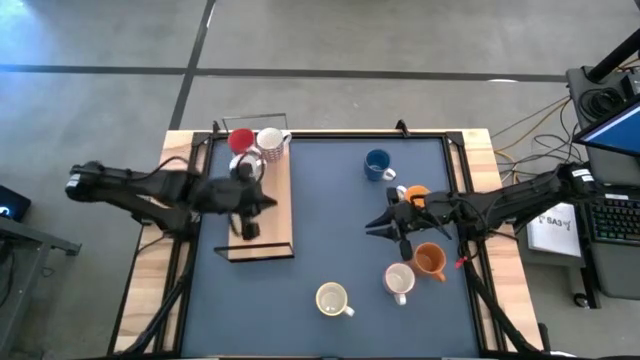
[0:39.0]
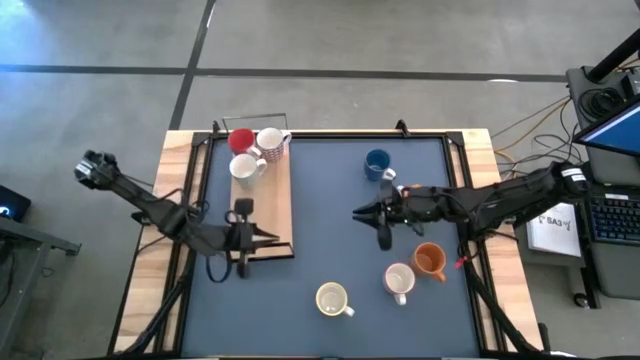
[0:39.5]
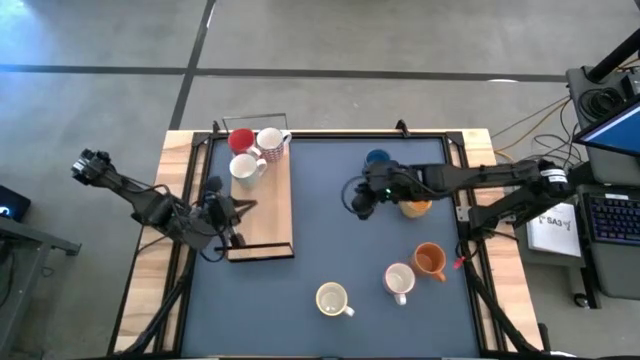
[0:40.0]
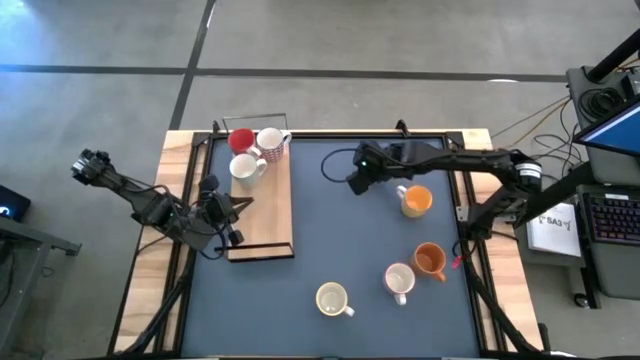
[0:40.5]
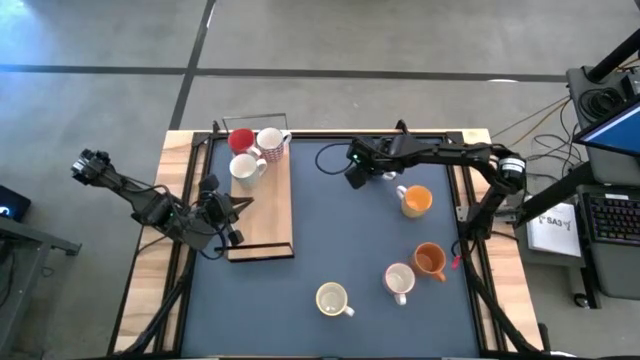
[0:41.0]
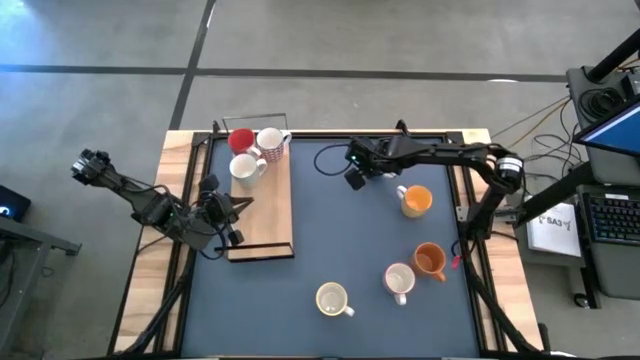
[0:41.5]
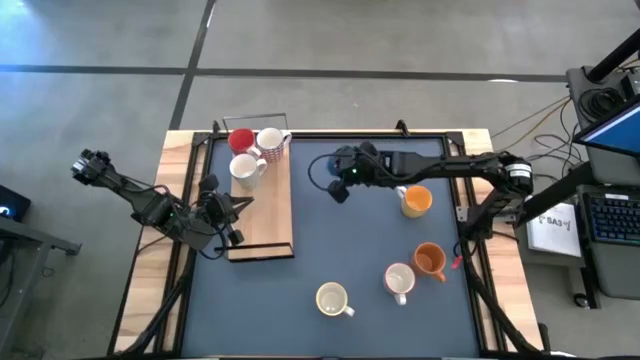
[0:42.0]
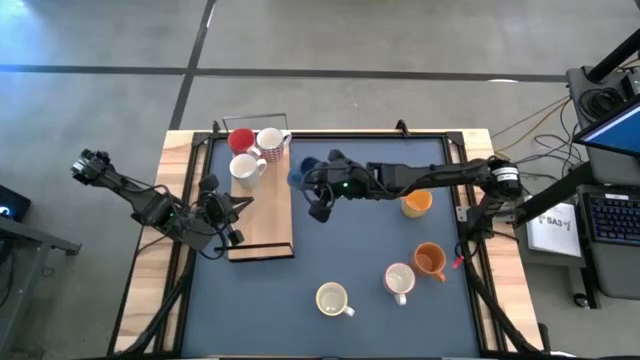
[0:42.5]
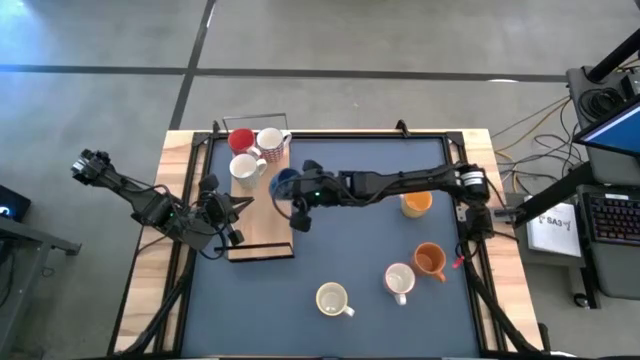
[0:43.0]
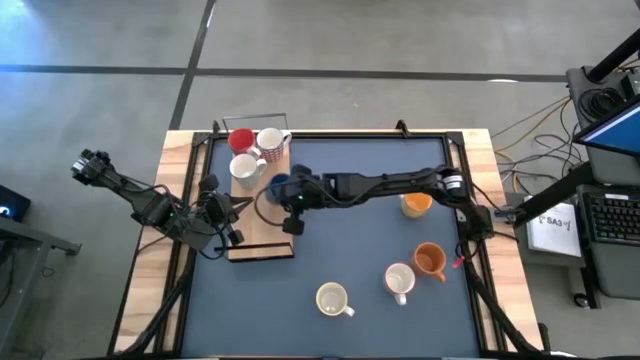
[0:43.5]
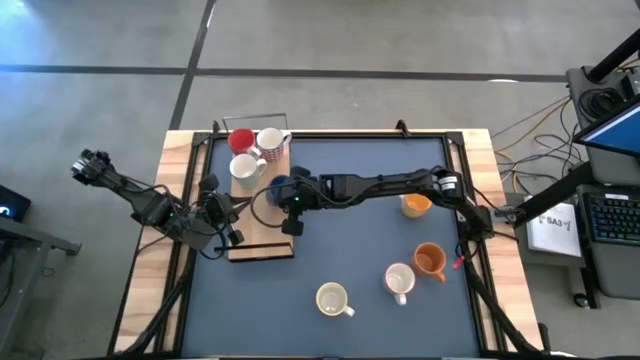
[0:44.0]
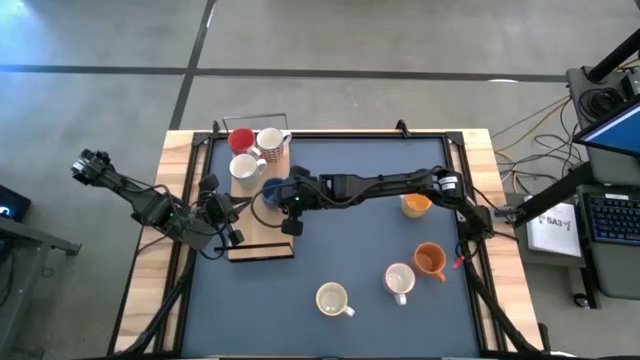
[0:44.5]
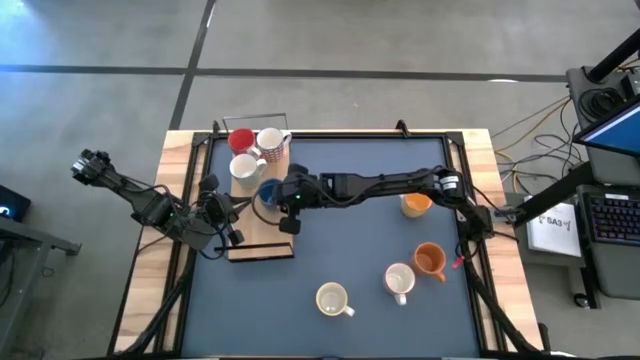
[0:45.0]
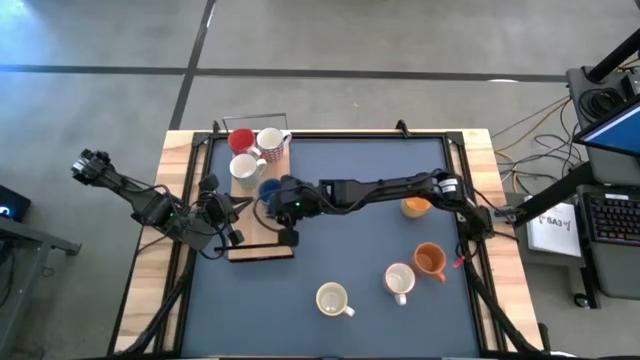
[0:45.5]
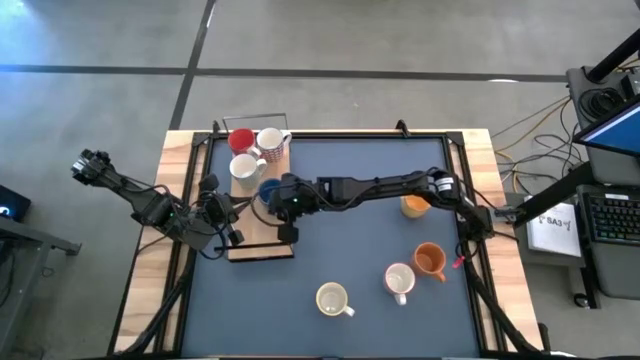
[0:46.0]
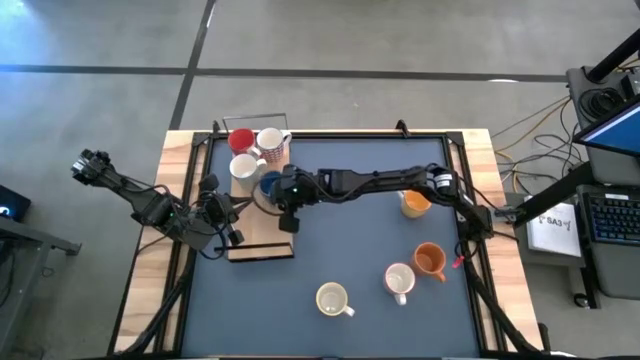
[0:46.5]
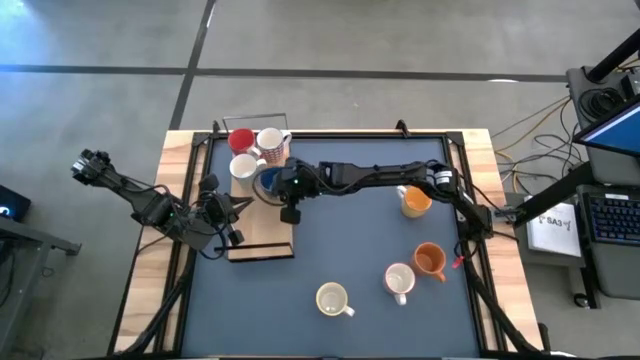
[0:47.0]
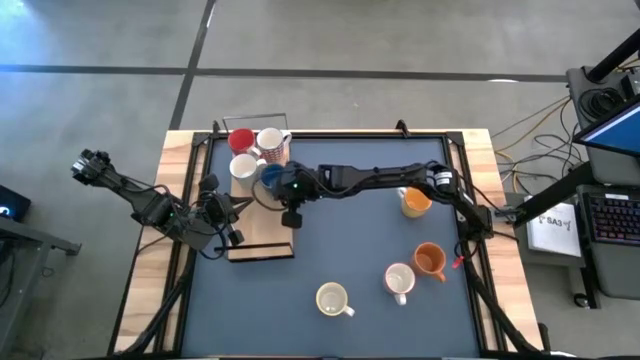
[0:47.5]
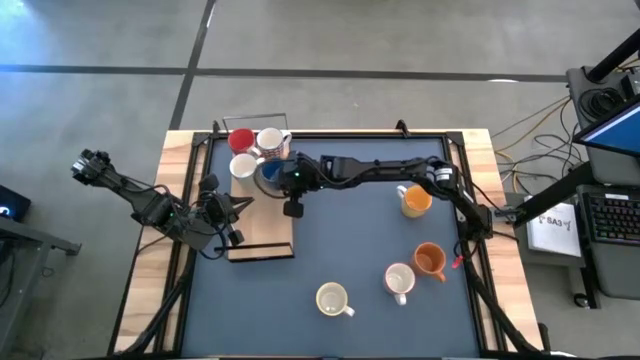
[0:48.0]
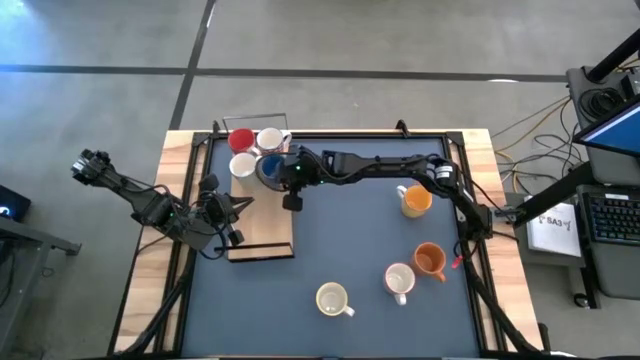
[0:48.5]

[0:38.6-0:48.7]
Task: Place coffee mugs
Put the blue mug on the shelf

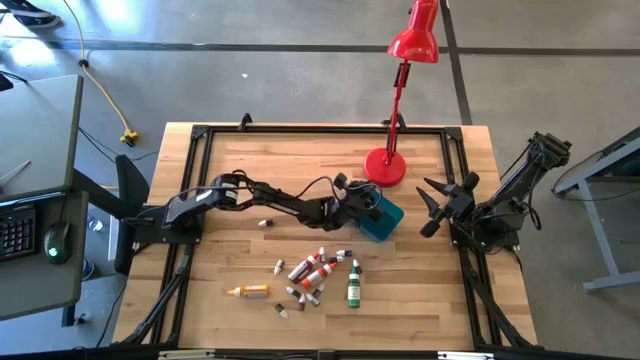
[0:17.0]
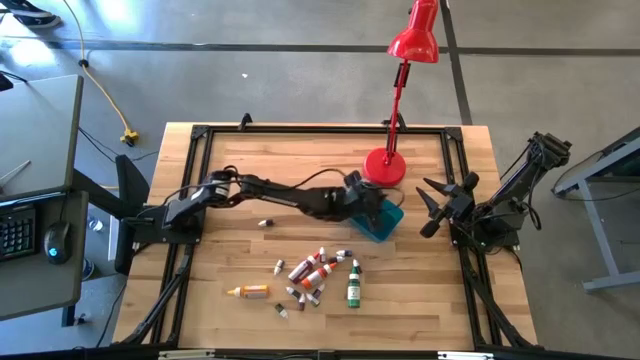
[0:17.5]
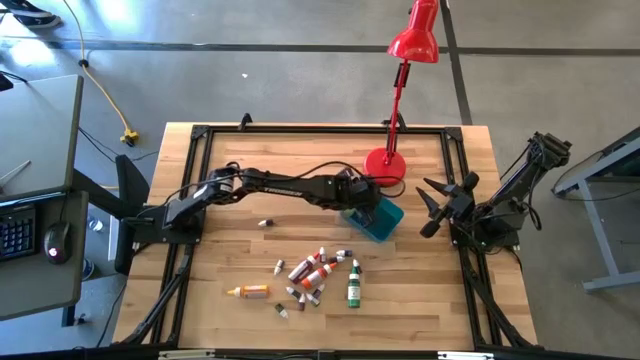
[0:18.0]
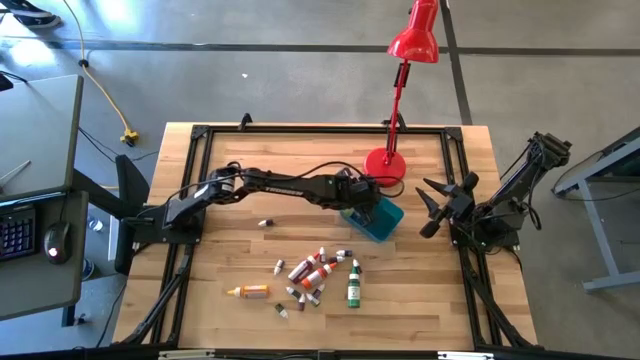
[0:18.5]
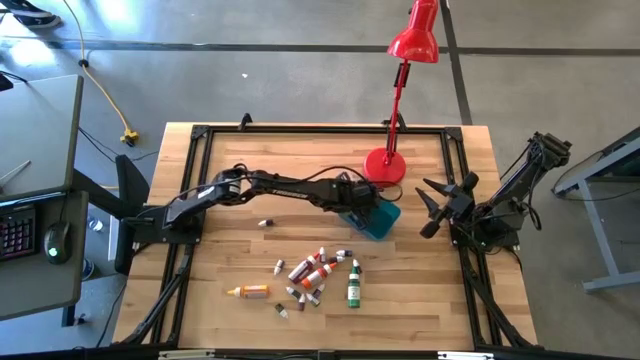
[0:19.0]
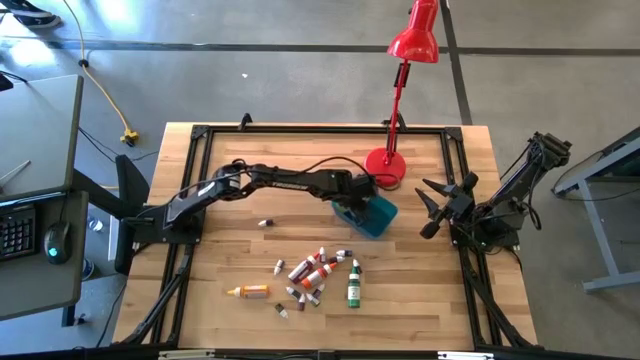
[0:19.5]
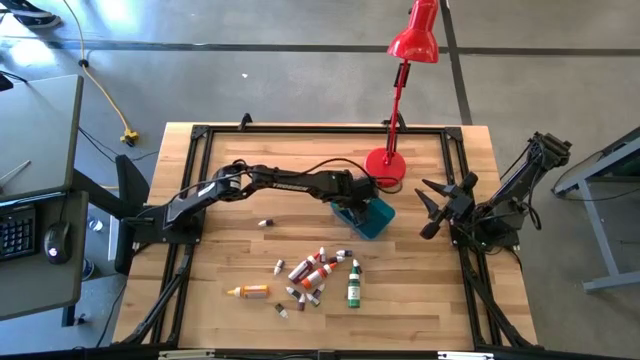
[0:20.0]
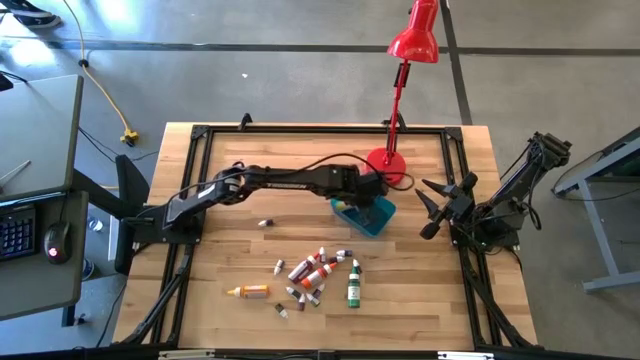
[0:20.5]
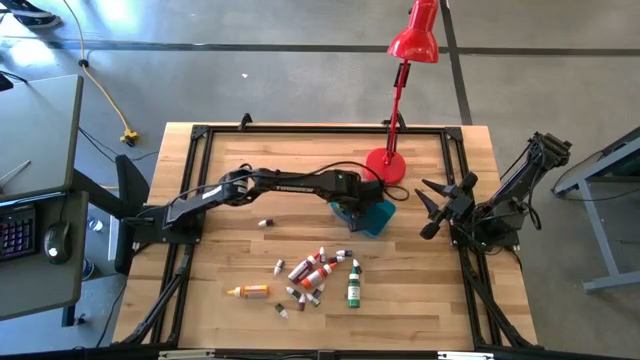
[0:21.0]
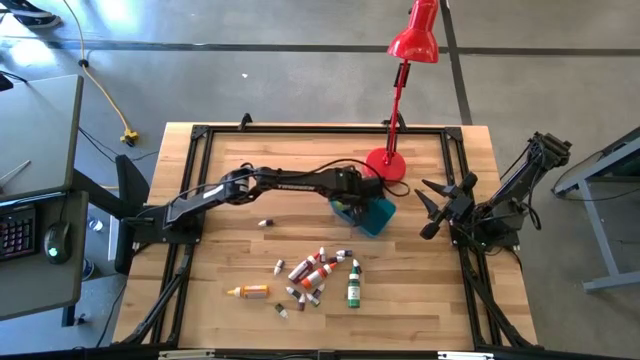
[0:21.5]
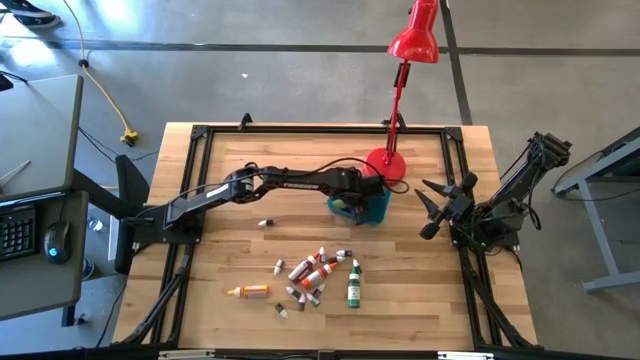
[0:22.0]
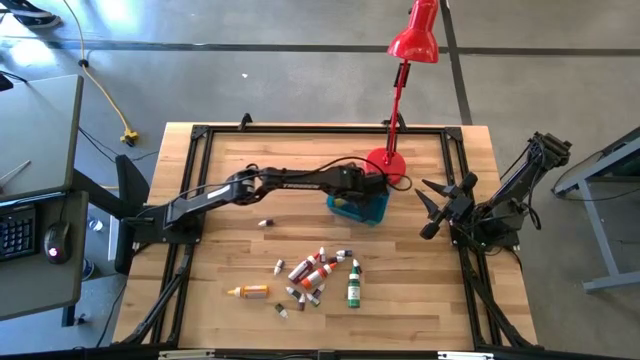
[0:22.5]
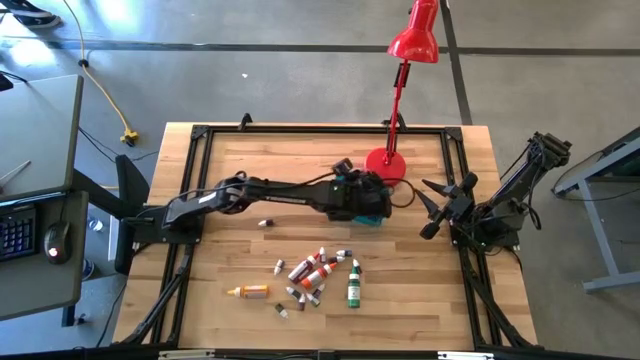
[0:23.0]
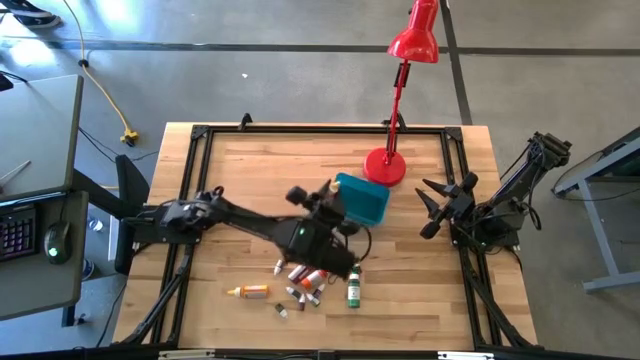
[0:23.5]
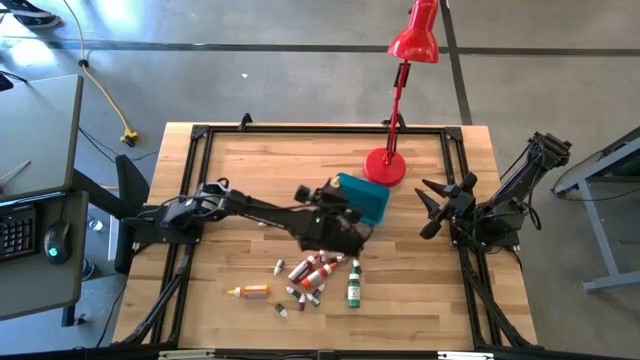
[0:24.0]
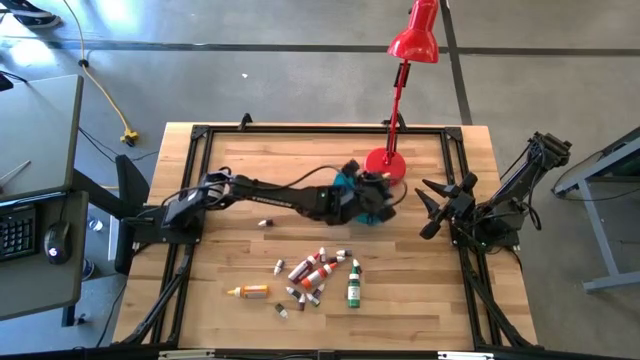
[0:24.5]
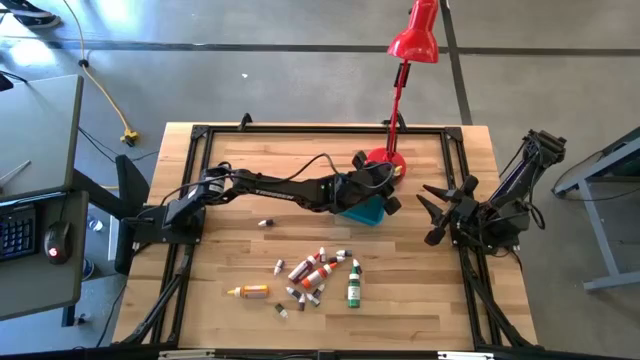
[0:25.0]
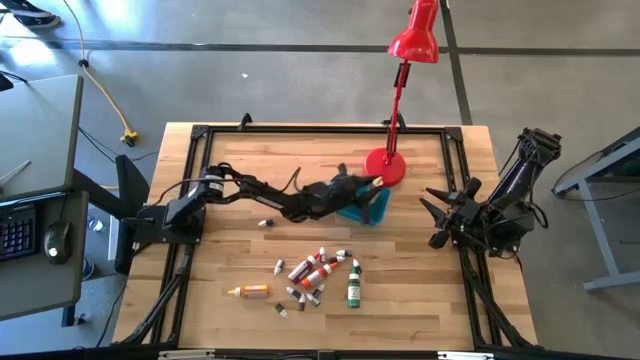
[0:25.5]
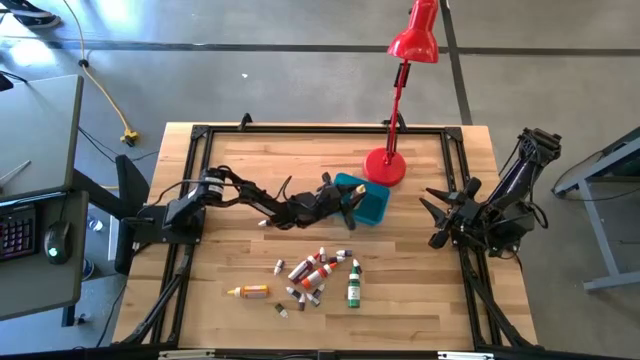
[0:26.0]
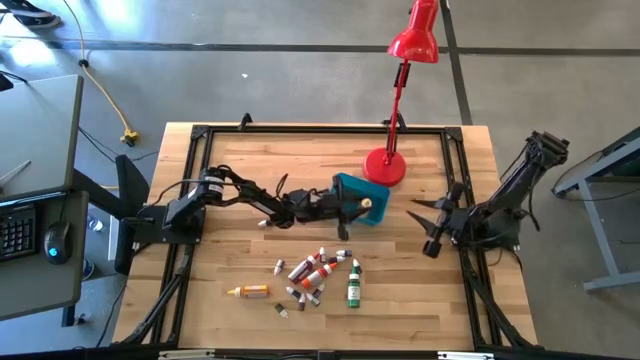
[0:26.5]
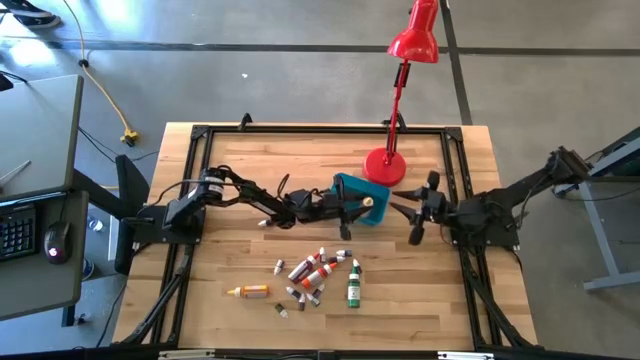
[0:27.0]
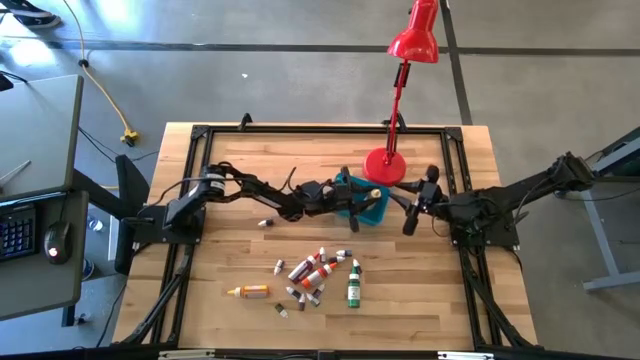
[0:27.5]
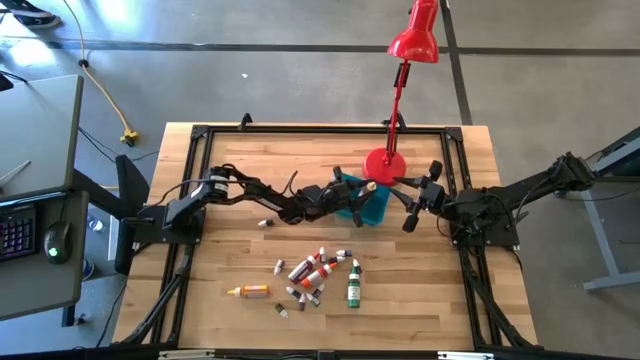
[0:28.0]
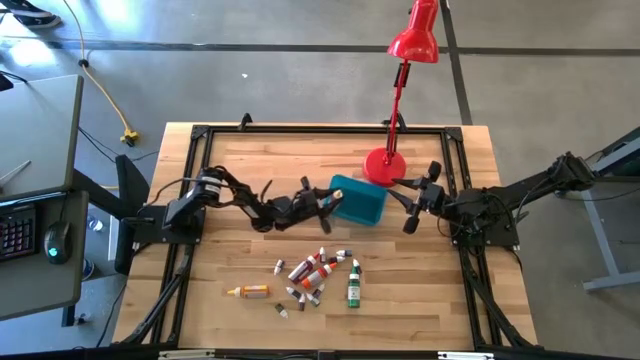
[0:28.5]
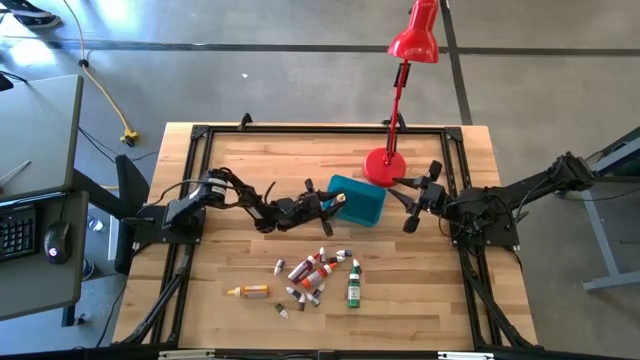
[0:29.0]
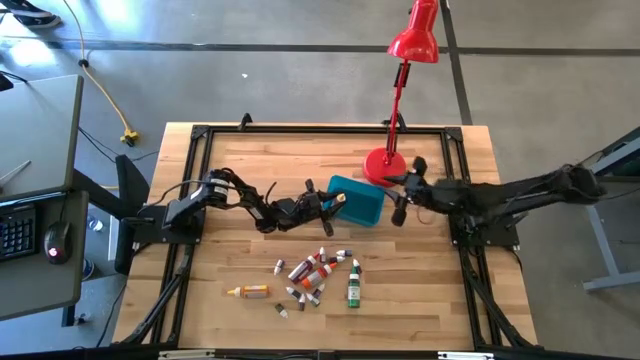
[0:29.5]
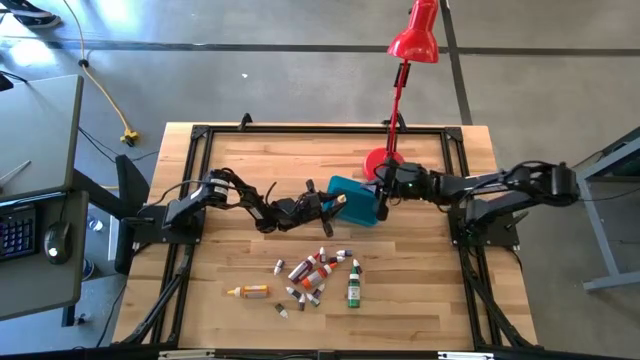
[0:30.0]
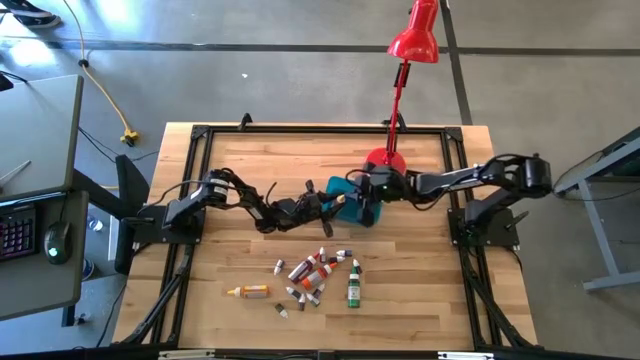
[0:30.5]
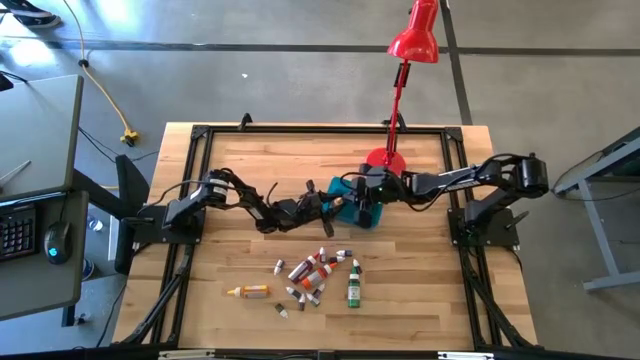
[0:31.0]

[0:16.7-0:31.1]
Task: Pick & Place food coloring
Put the big yellow food coloring bottle into the blue container
